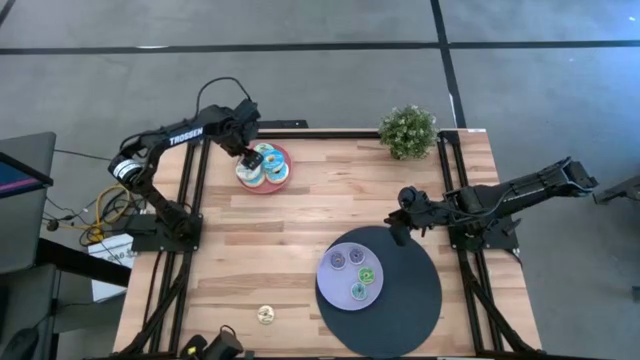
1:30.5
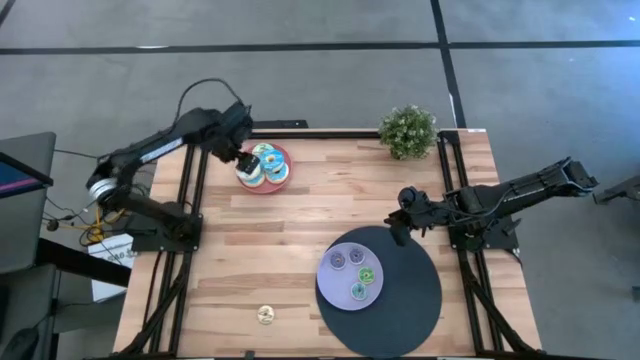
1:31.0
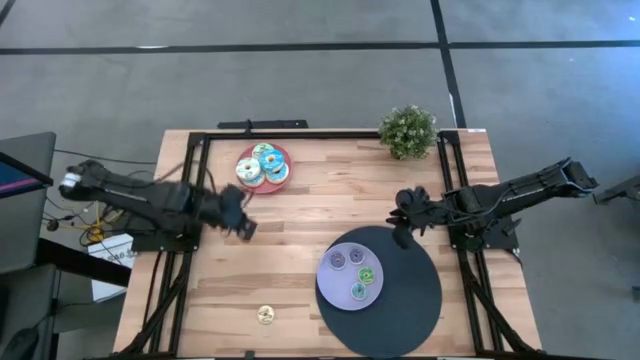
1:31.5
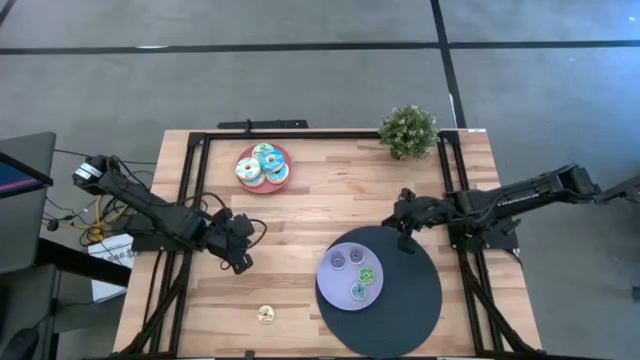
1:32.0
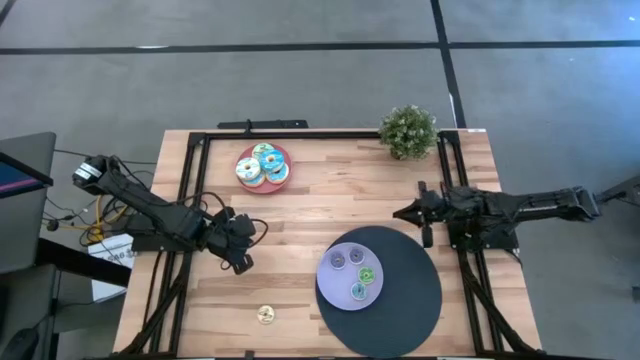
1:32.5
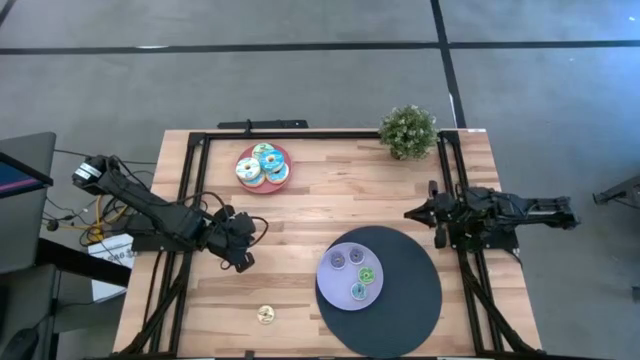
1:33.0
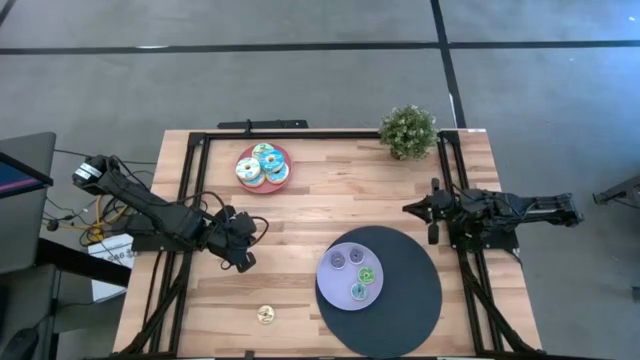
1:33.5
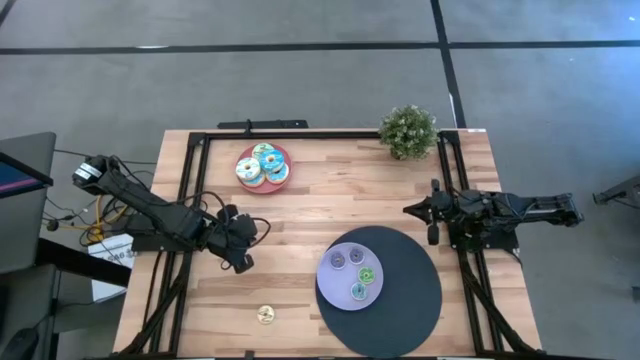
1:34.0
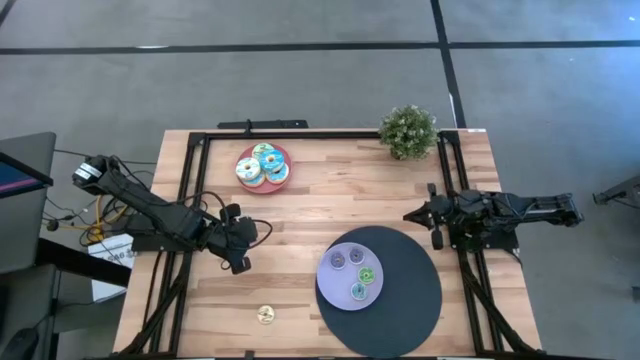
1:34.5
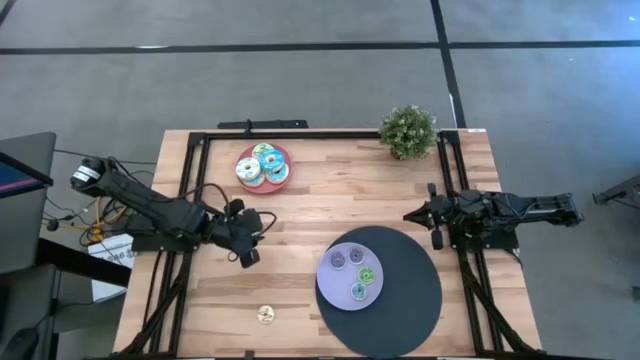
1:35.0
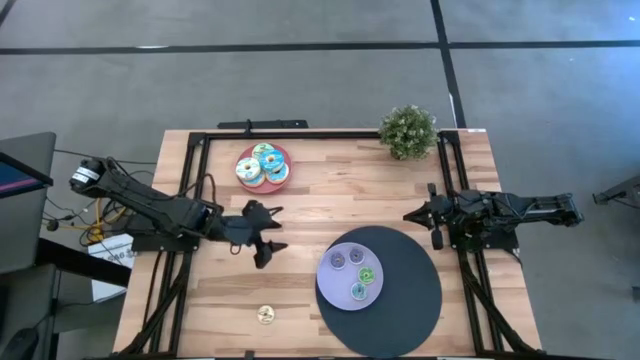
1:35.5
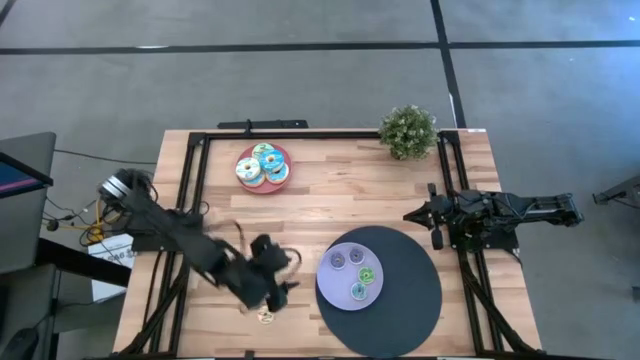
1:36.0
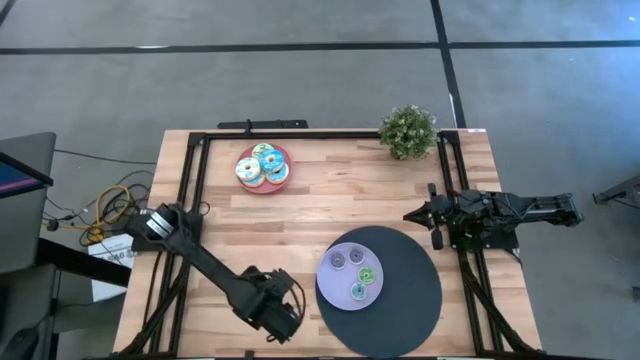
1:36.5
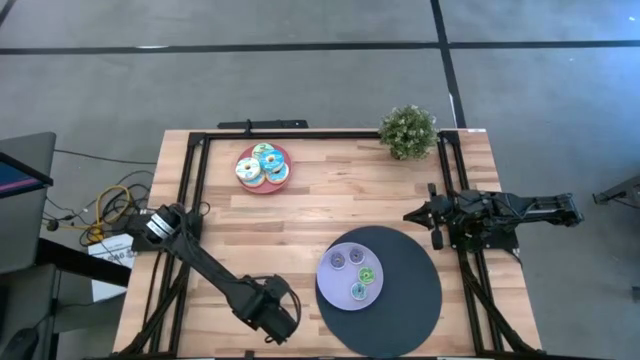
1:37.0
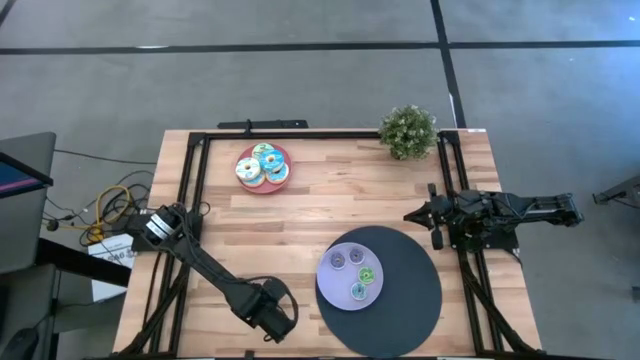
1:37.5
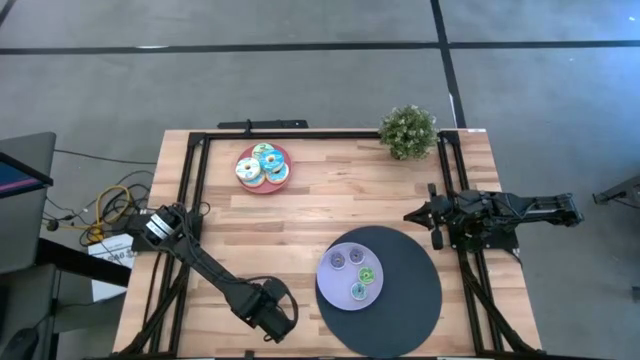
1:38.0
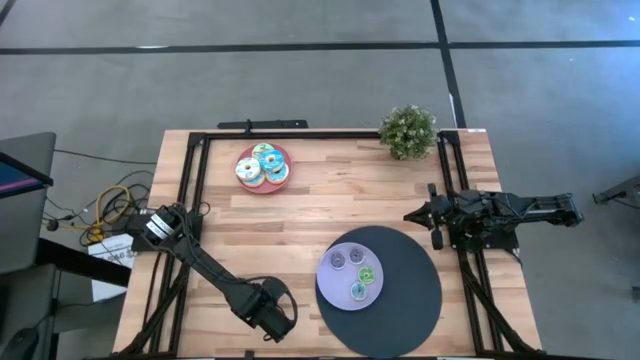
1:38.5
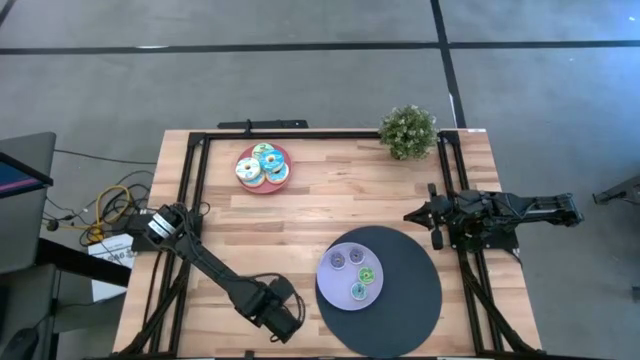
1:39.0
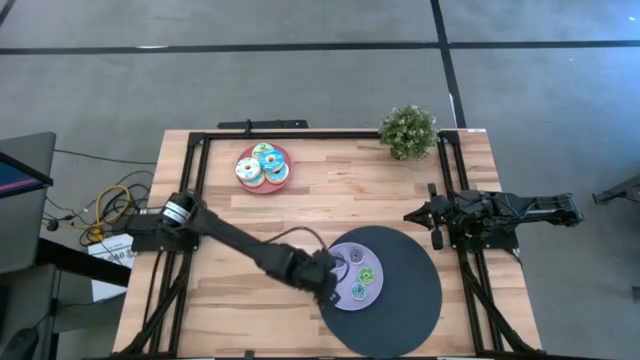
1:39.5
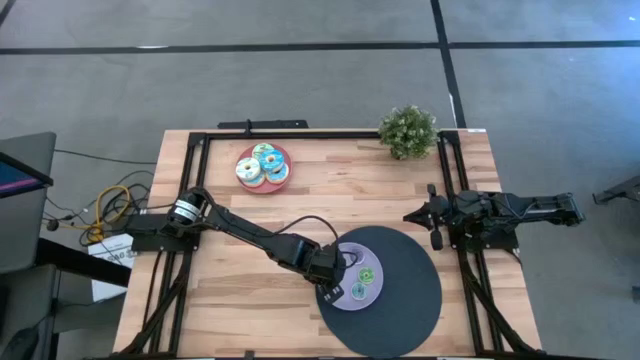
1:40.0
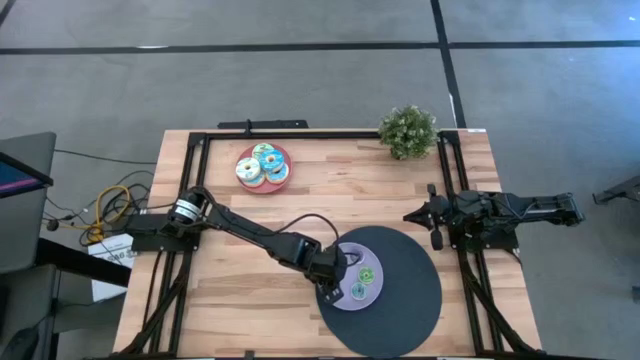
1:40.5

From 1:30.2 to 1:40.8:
Task: Pick & Place donuts
Put the small white donut on the purple plate

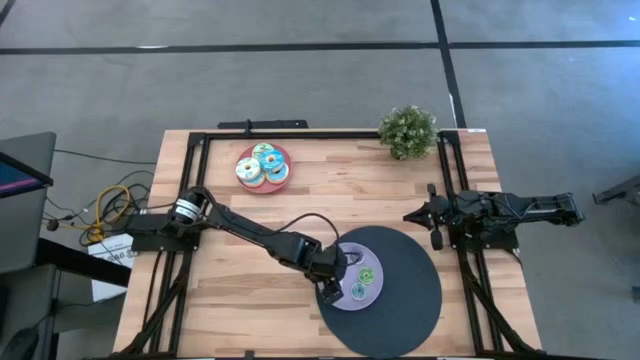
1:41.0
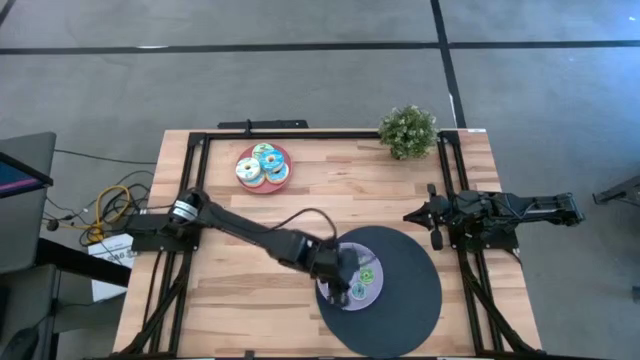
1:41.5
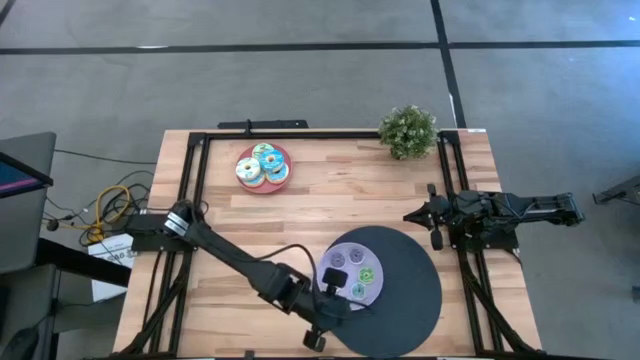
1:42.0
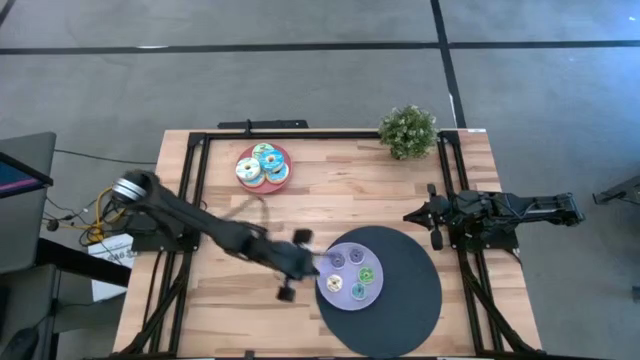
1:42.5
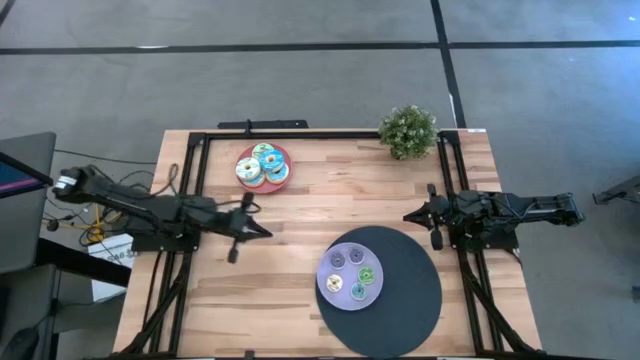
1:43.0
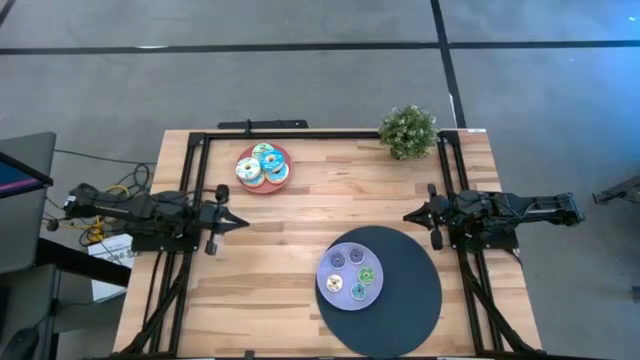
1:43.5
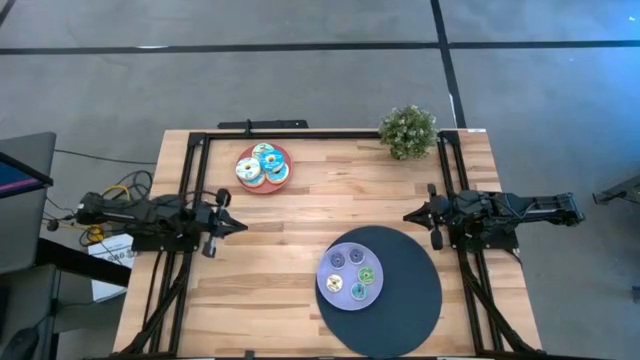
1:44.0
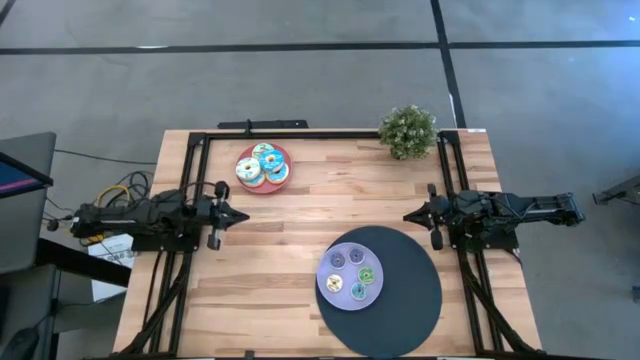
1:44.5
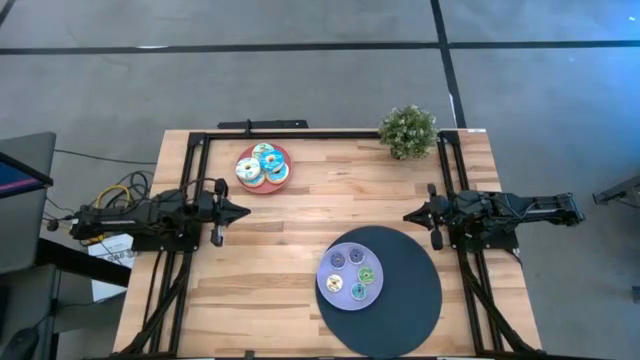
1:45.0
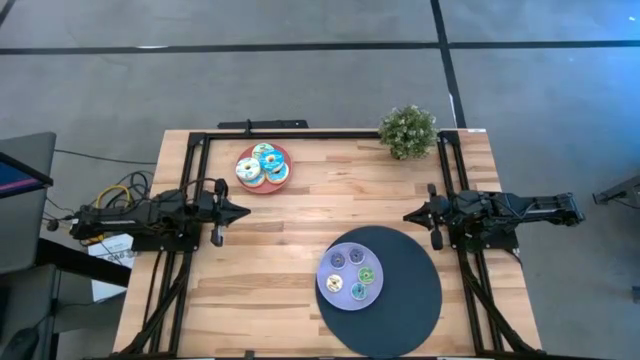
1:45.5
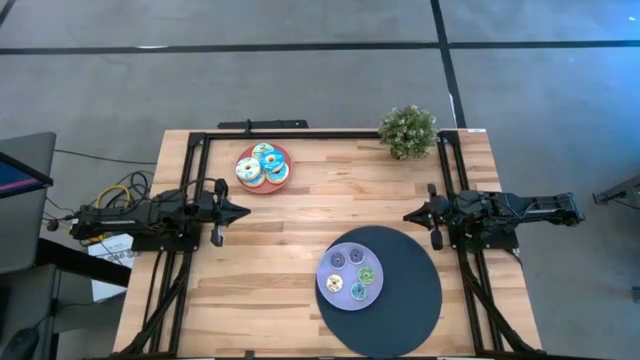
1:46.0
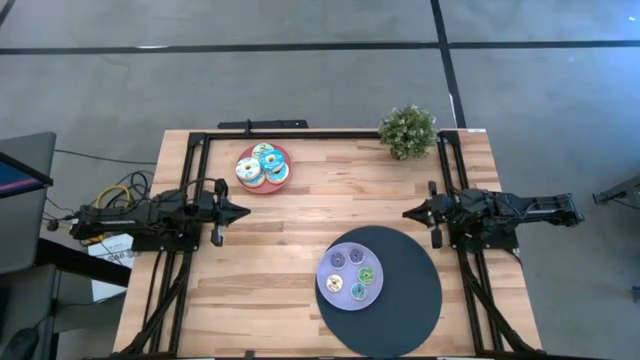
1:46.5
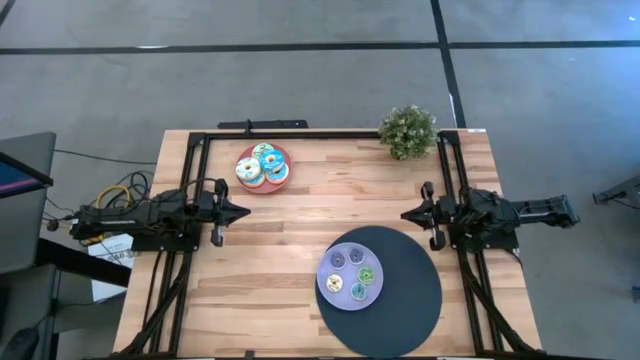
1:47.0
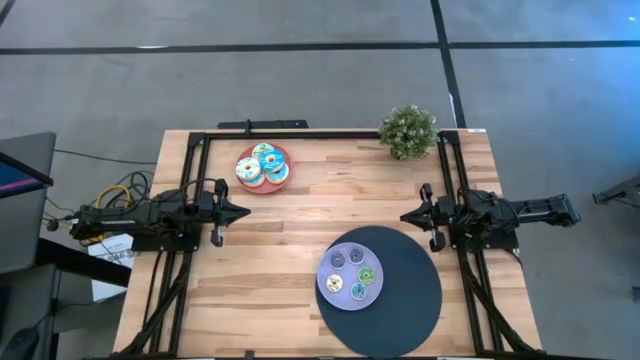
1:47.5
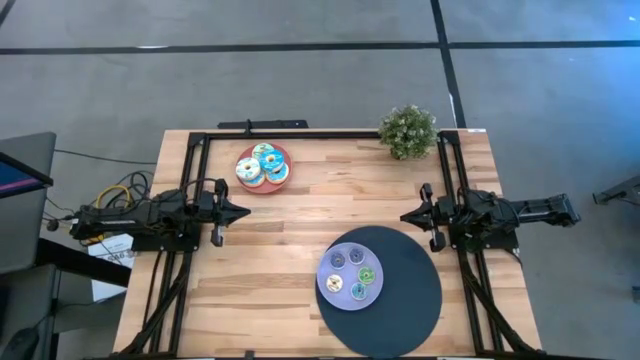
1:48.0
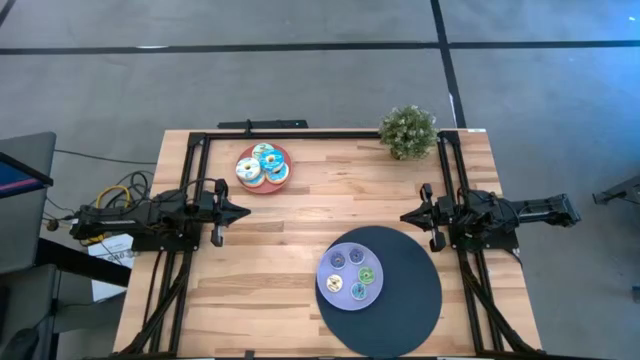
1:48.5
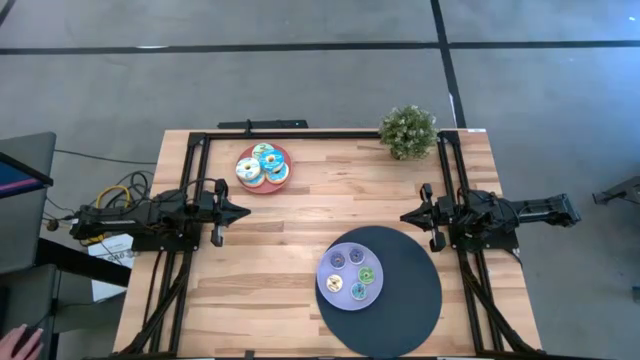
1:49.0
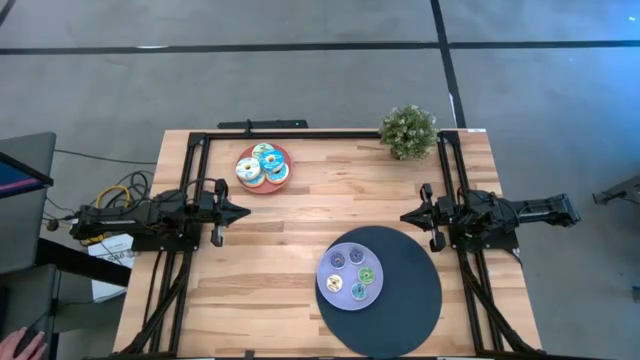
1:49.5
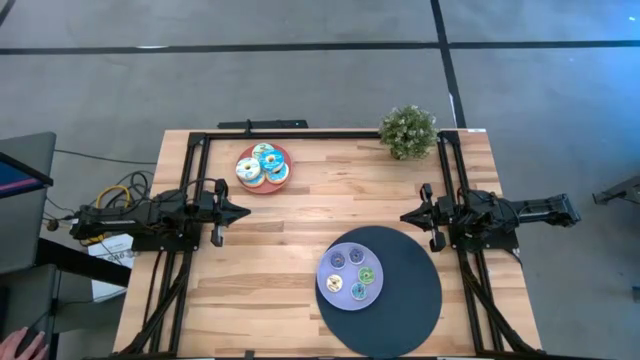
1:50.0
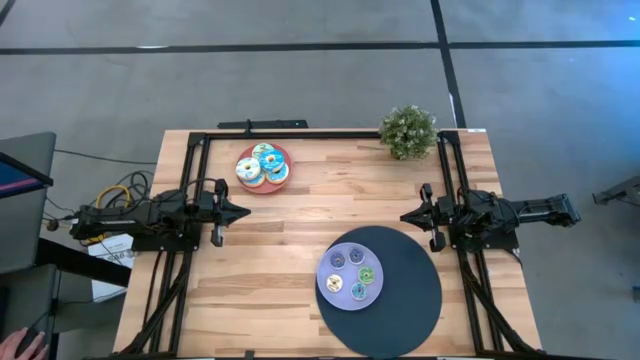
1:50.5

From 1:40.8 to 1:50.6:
Return to Home Position

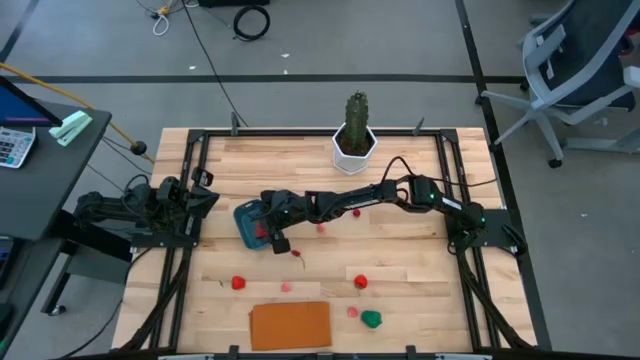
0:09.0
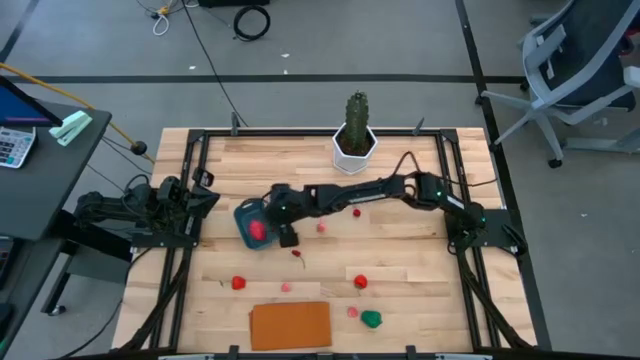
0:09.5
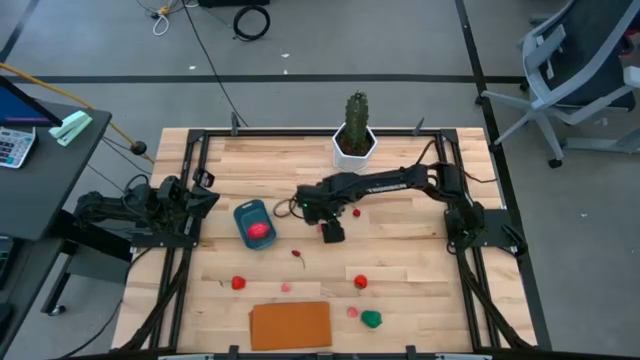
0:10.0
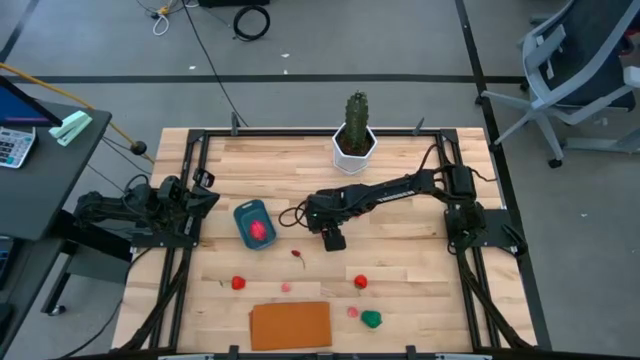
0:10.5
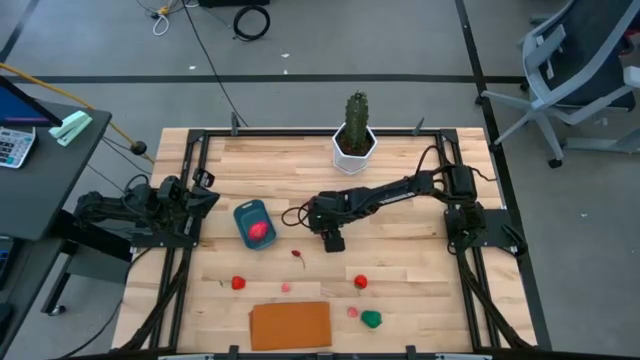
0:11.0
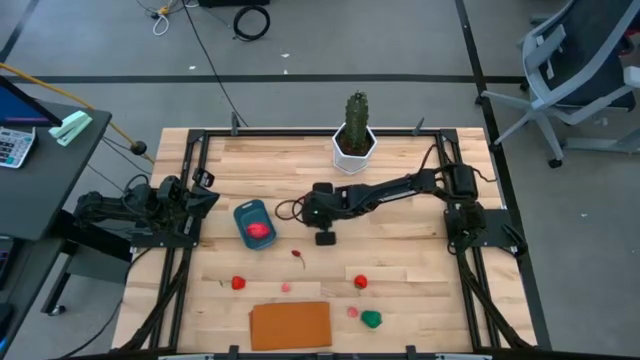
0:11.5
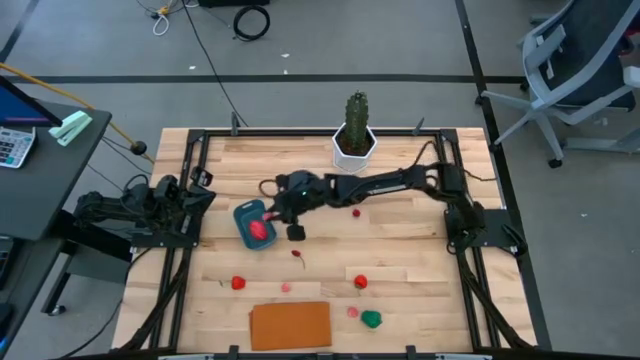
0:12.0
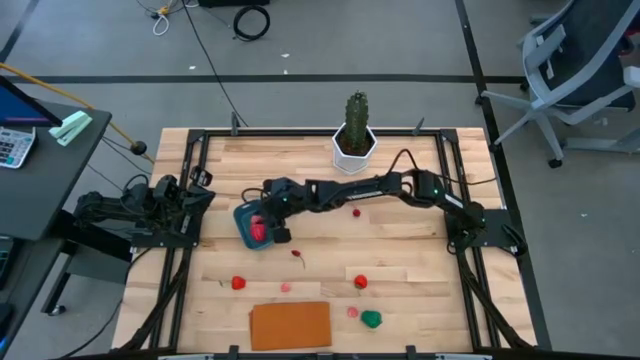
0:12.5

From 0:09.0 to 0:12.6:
Task: Pick and placing Produce into tupperware
Put the peach into the blue bin
